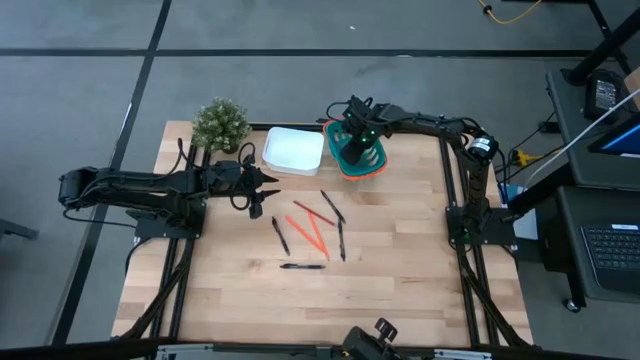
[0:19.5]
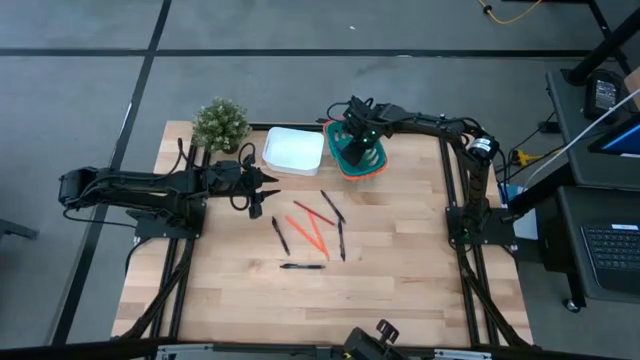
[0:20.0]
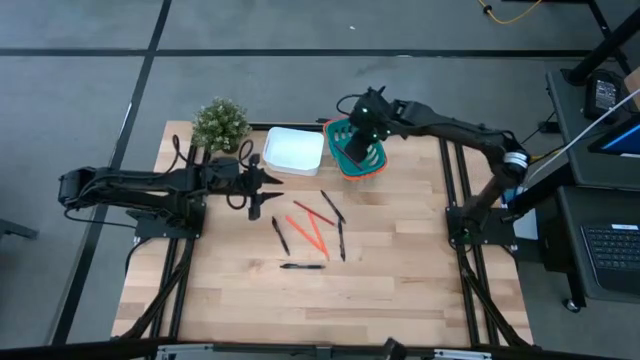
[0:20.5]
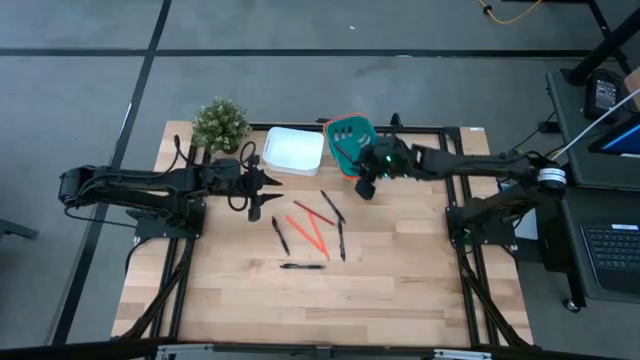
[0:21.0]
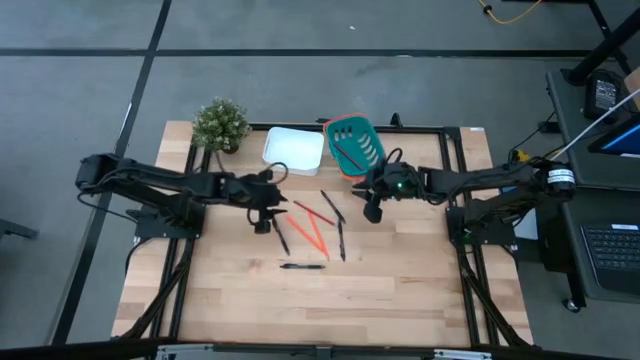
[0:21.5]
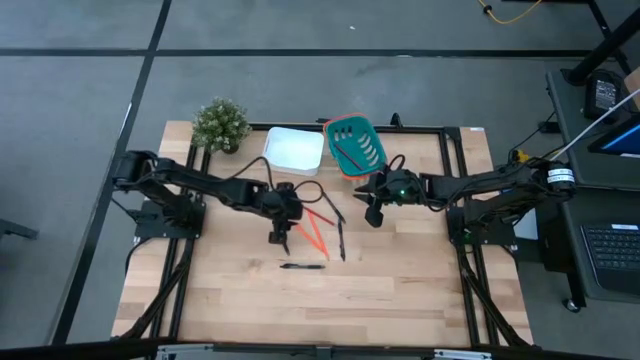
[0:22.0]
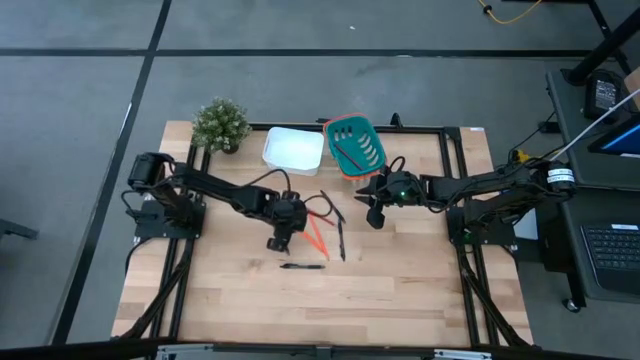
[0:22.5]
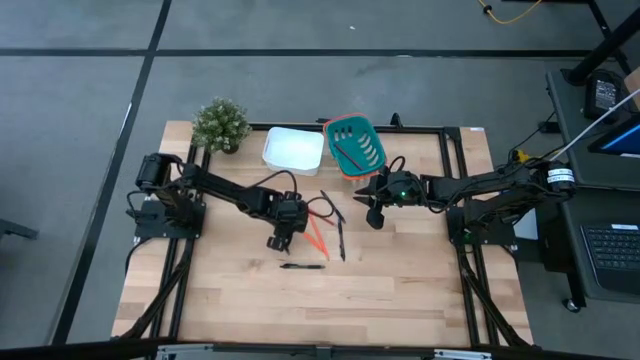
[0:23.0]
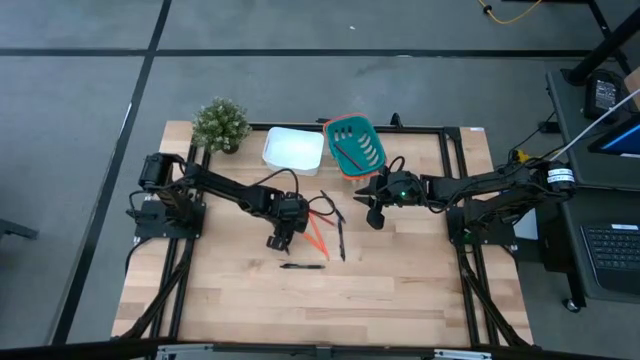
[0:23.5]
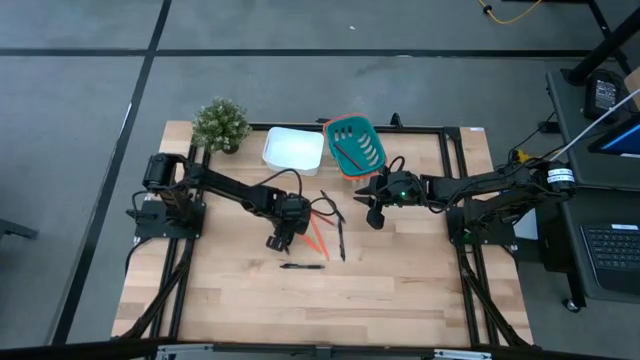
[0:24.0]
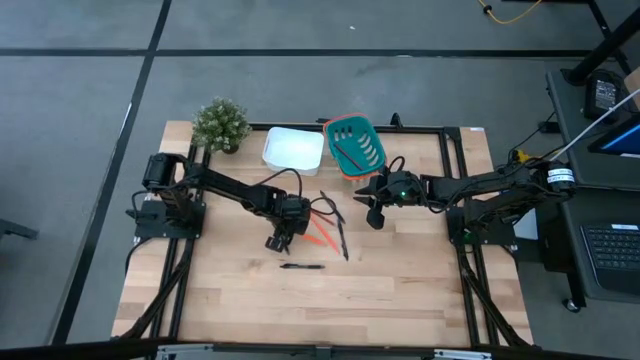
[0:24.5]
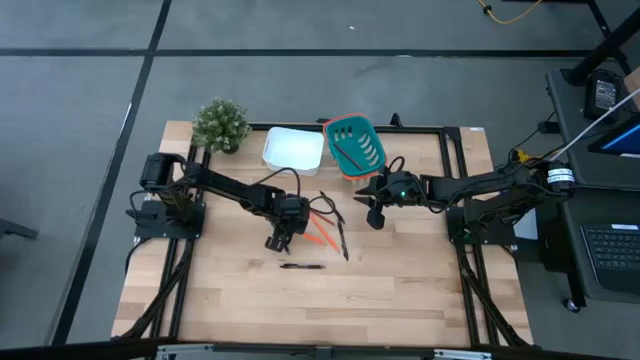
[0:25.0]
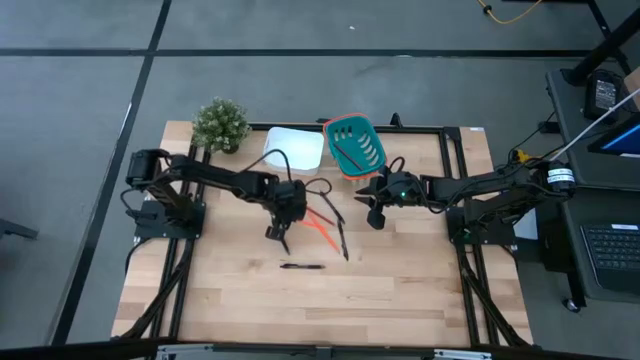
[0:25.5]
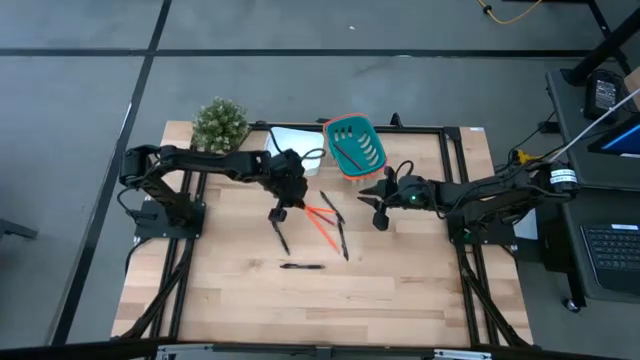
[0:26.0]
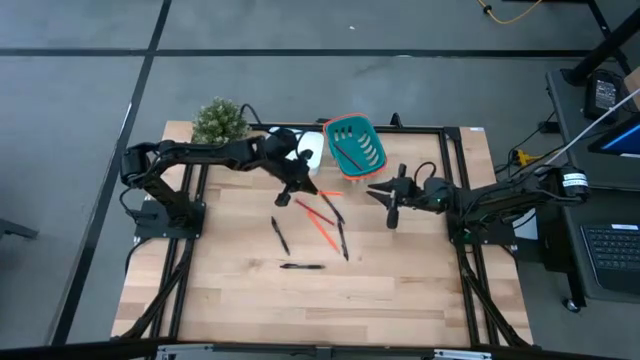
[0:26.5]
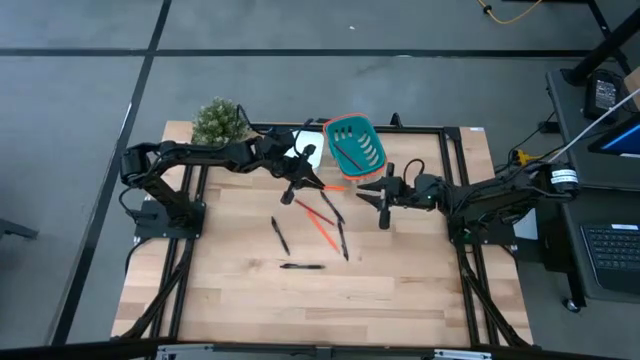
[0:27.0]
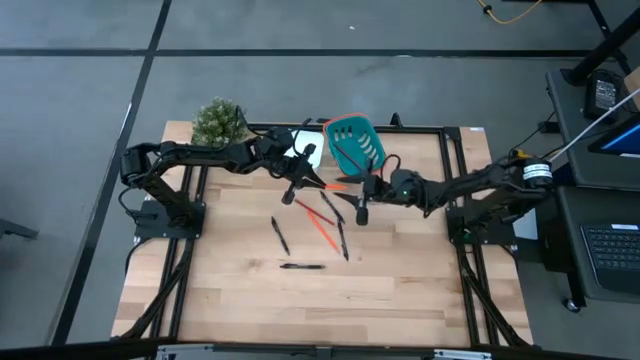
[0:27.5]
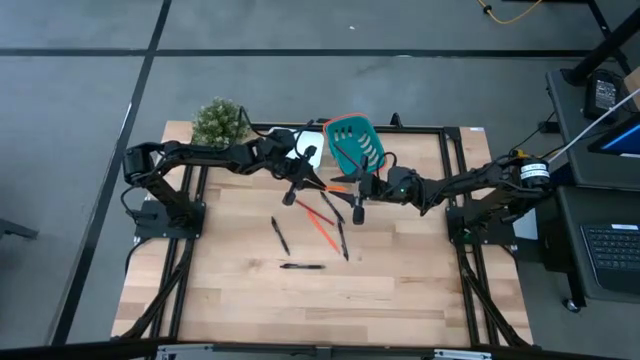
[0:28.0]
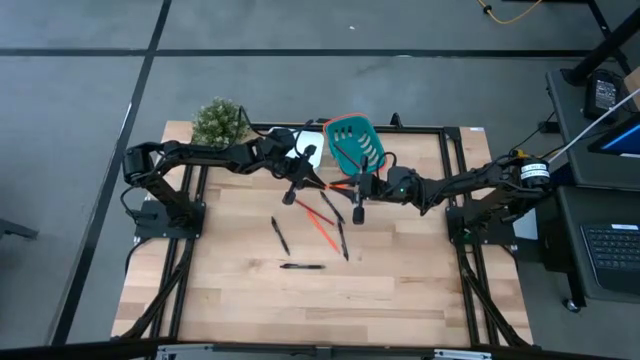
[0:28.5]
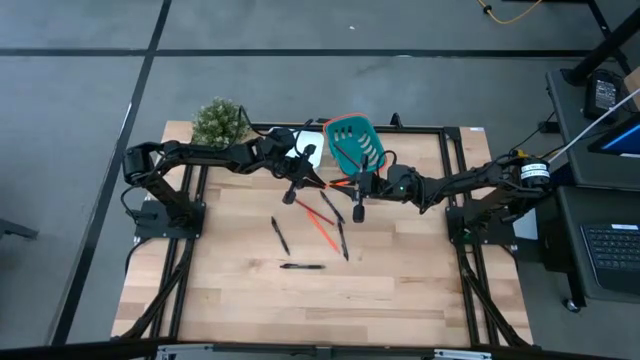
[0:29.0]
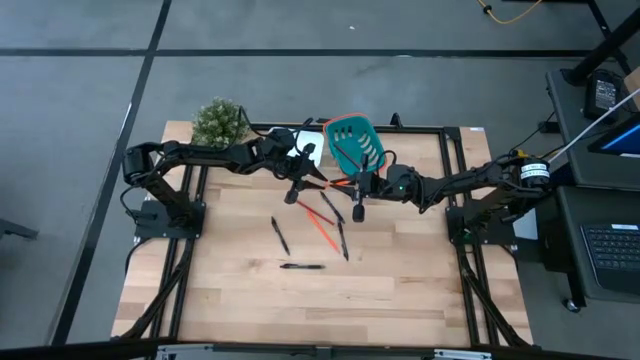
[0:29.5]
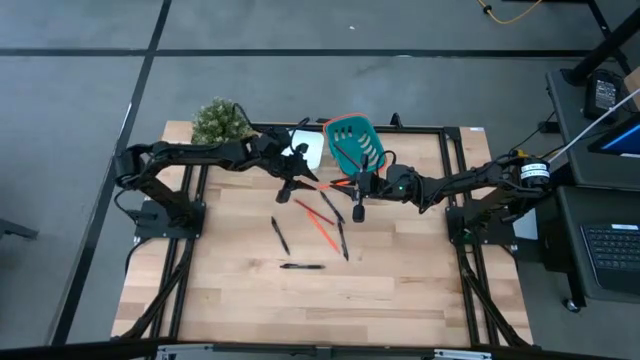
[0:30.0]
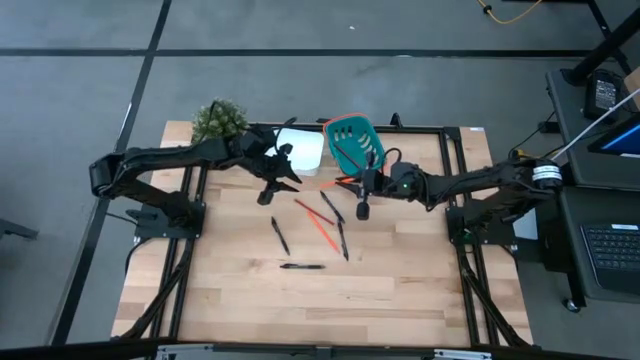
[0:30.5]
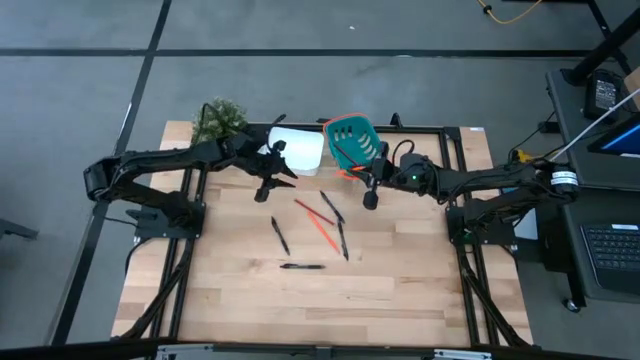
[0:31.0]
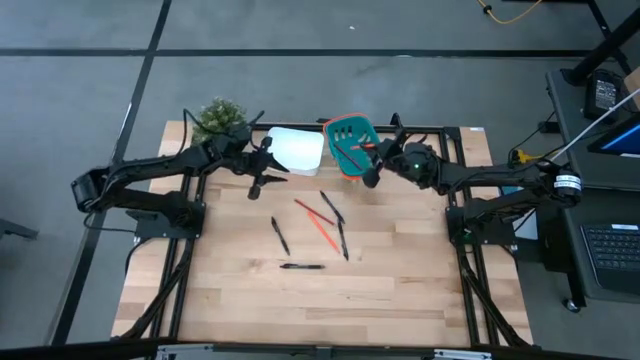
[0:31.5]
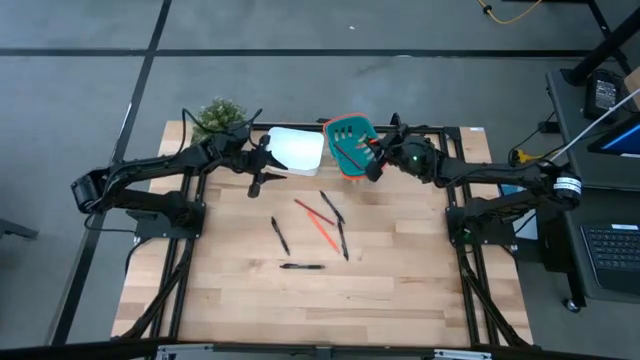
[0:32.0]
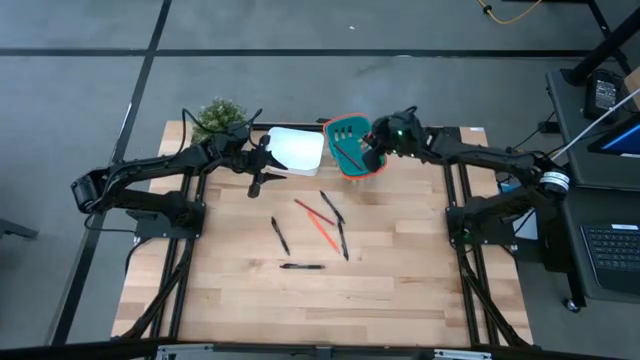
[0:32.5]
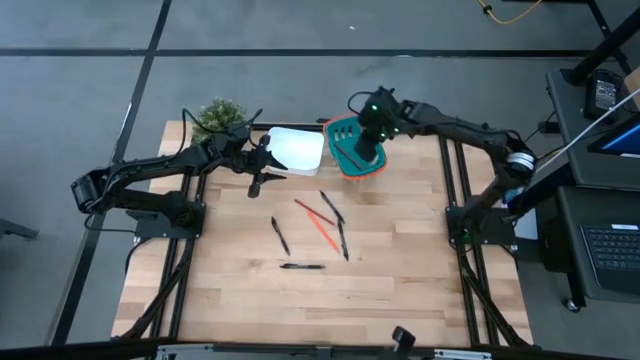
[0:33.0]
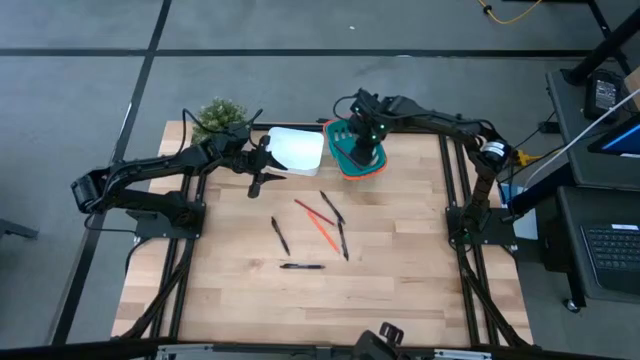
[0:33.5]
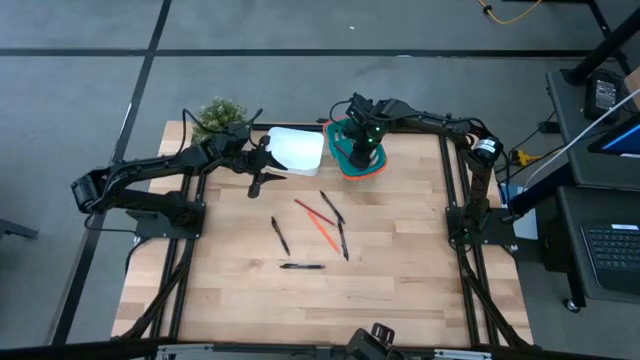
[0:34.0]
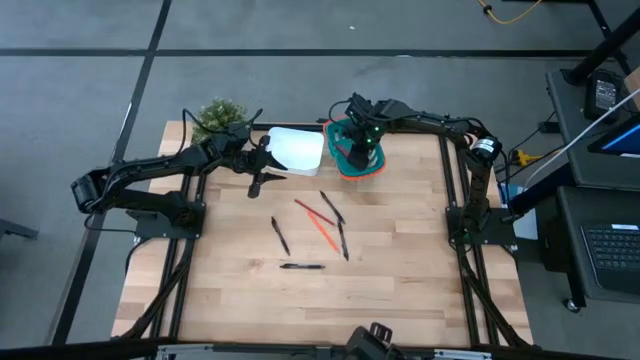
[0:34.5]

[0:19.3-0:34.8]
Task: Sort pens & pencils
Put the left orange pencil into the dark green bin

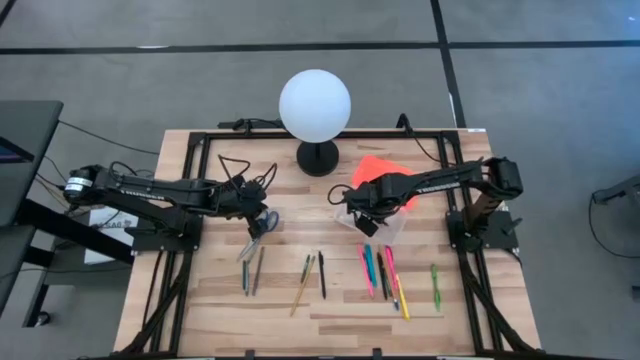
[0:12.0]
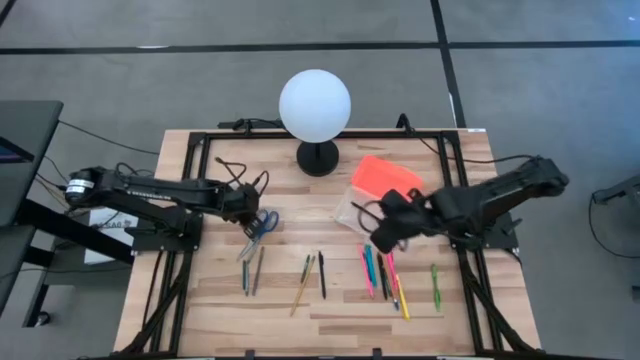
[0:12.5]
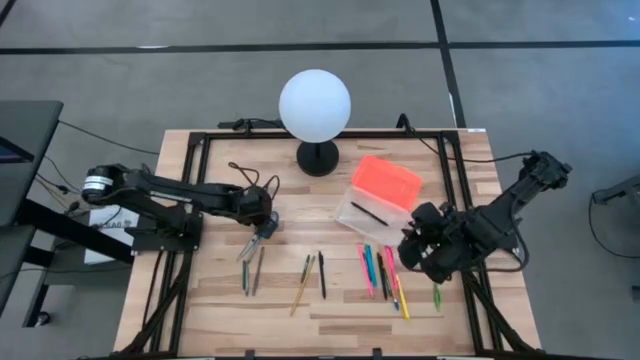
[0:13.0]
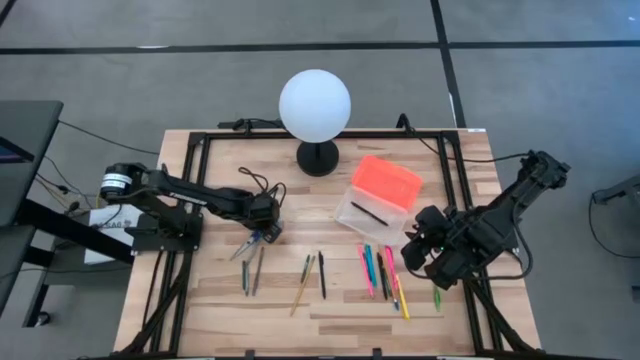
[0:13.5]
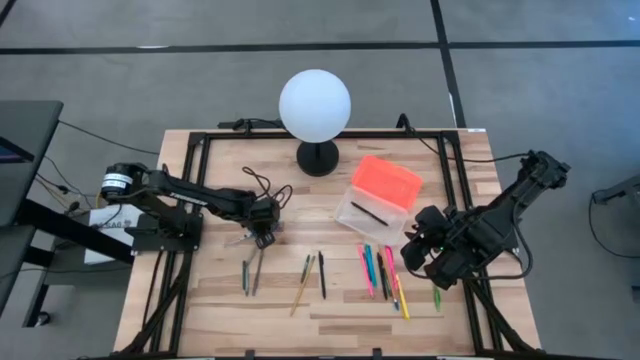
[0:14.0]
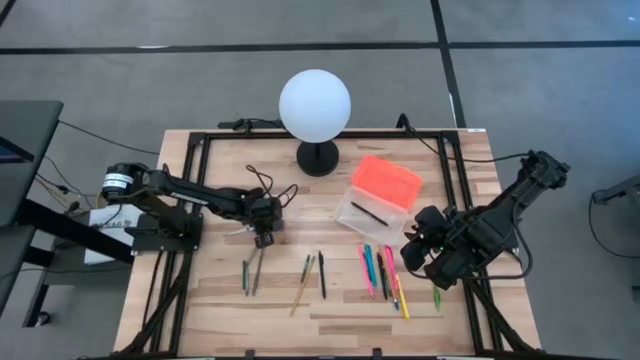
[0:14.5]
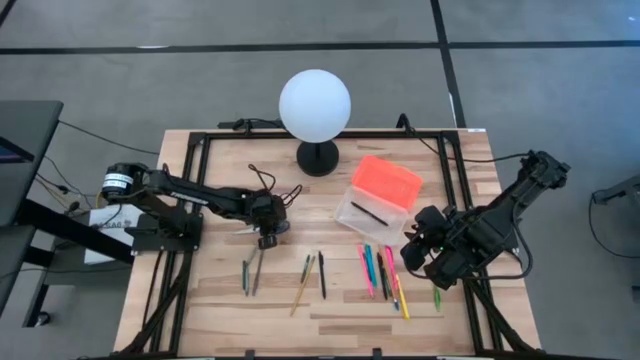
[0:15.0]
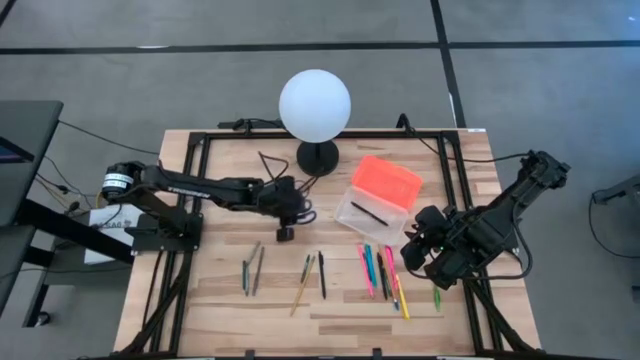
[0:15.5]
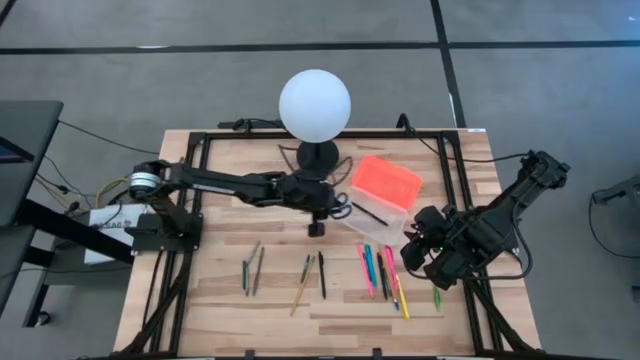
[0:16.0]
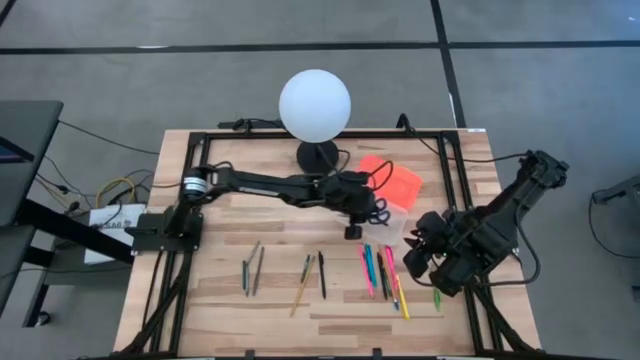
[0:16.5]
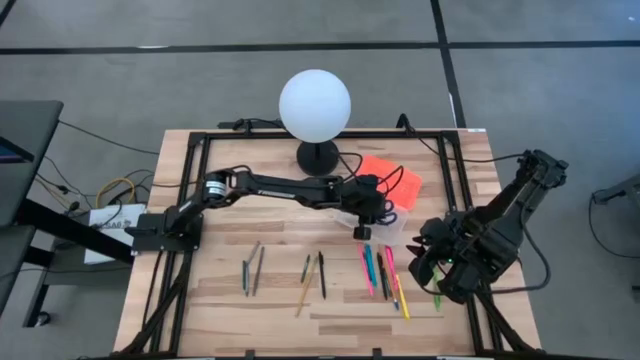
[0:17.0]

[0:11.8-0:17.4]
Task: Pick & place school supplies into a supply box
Put the scissors into the orange supply box
